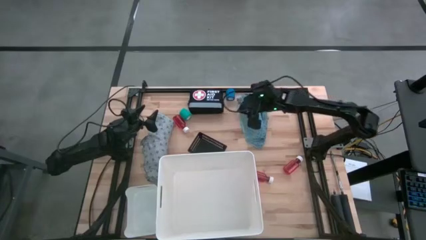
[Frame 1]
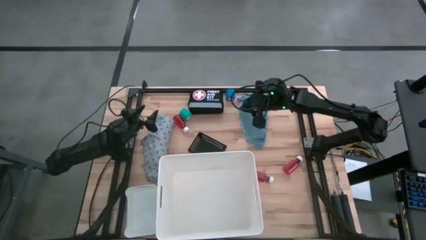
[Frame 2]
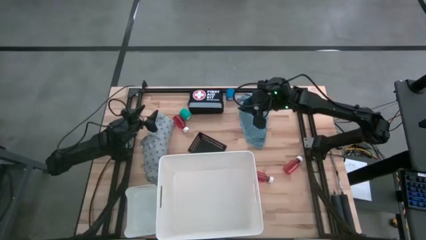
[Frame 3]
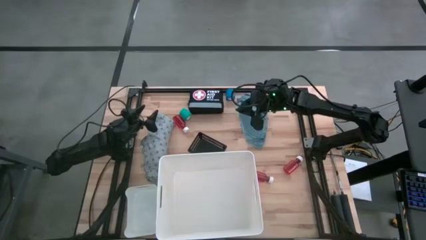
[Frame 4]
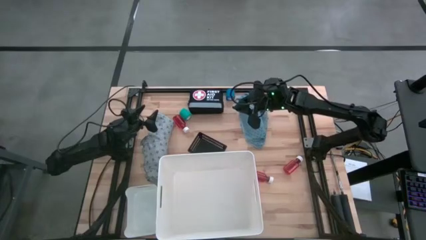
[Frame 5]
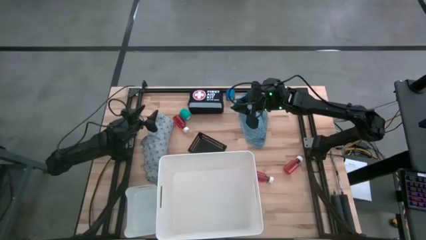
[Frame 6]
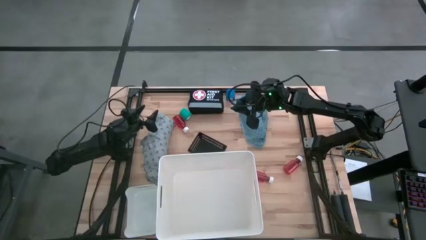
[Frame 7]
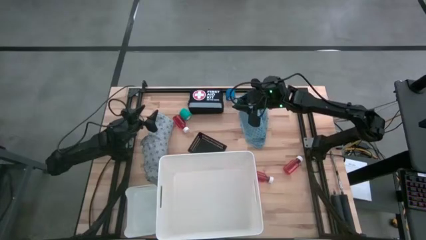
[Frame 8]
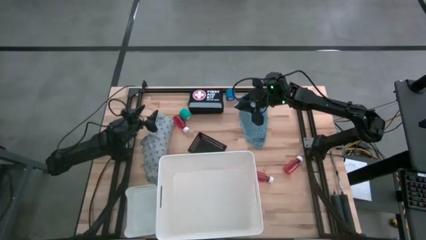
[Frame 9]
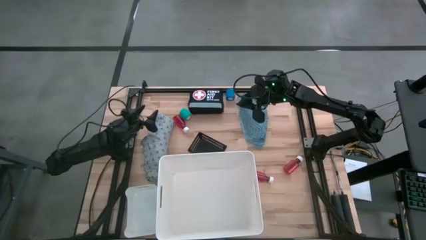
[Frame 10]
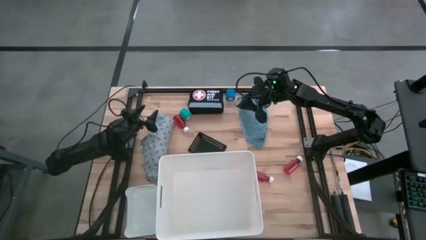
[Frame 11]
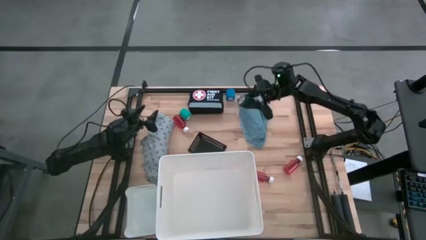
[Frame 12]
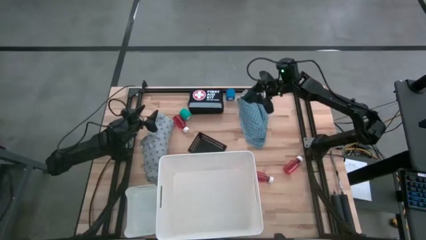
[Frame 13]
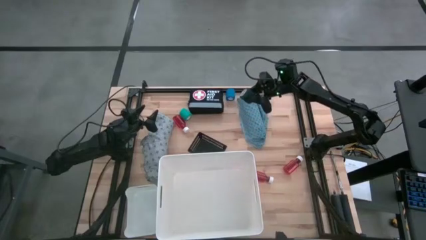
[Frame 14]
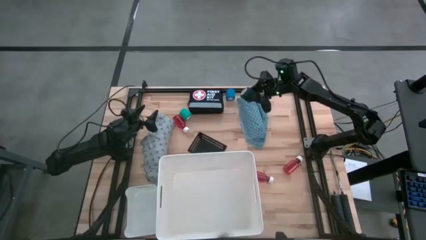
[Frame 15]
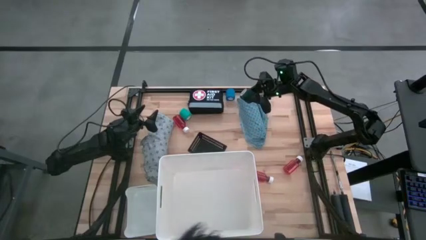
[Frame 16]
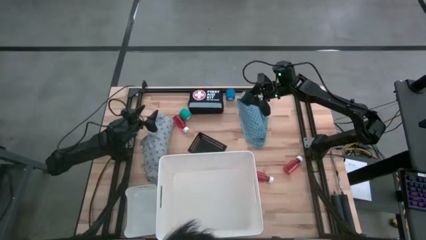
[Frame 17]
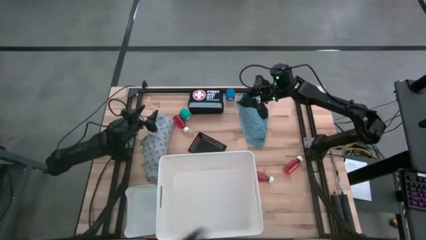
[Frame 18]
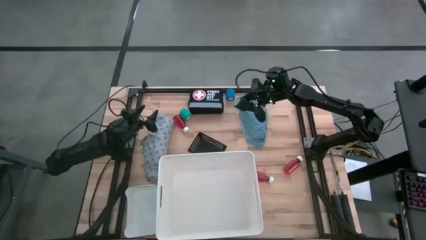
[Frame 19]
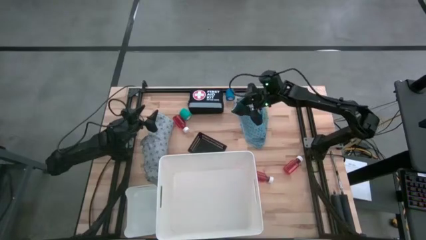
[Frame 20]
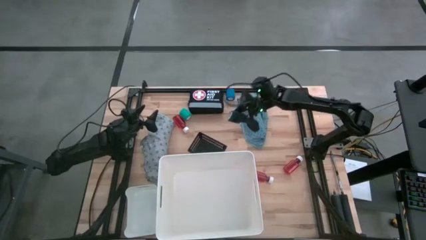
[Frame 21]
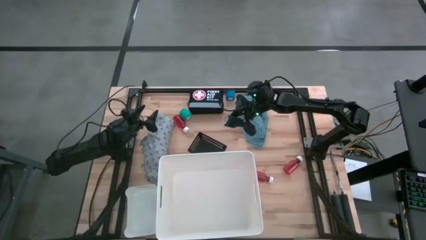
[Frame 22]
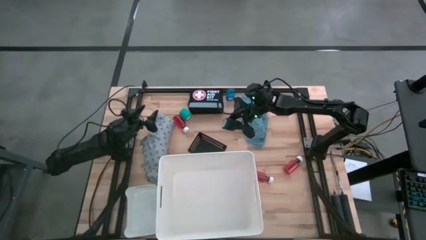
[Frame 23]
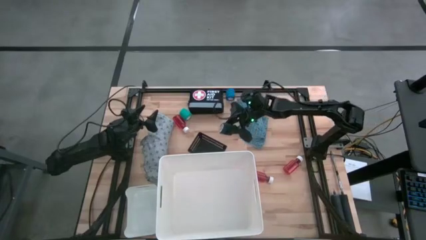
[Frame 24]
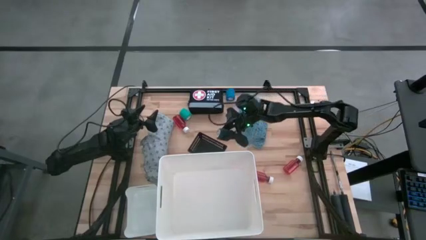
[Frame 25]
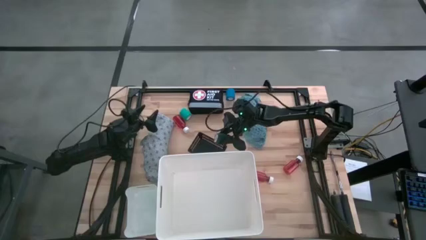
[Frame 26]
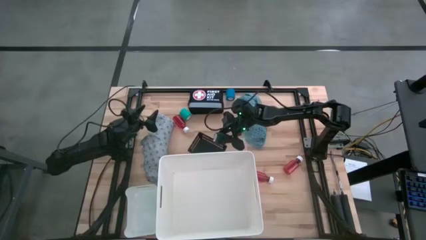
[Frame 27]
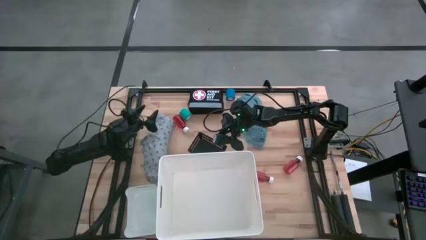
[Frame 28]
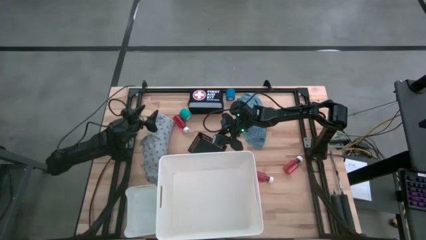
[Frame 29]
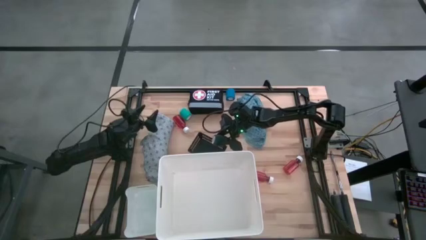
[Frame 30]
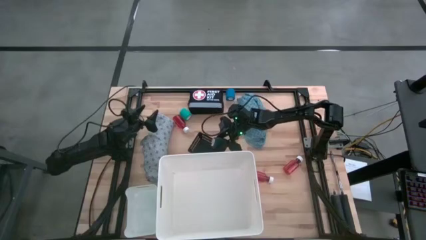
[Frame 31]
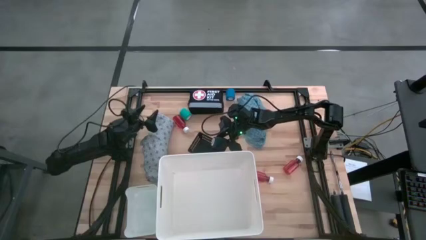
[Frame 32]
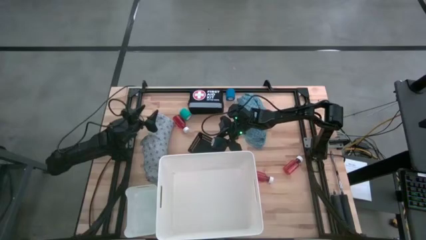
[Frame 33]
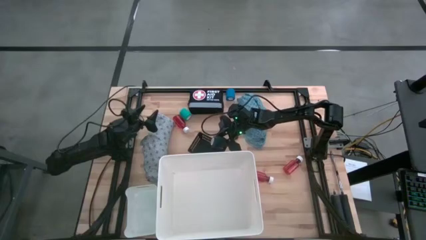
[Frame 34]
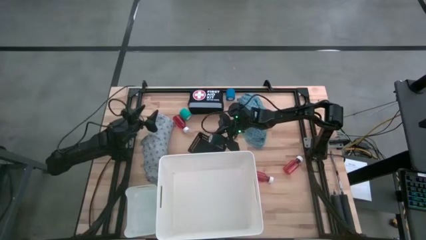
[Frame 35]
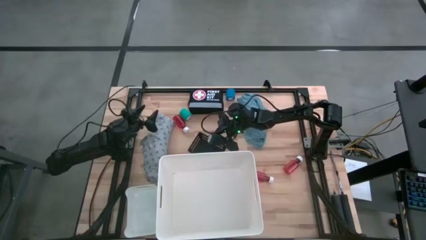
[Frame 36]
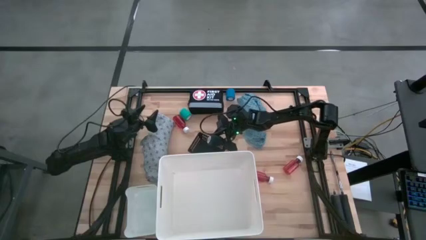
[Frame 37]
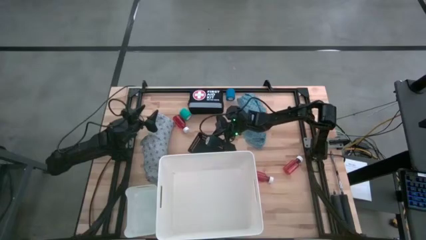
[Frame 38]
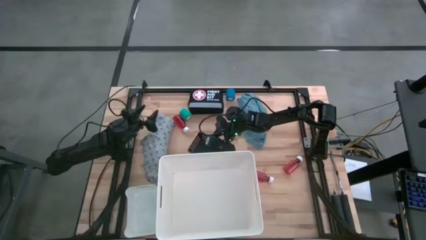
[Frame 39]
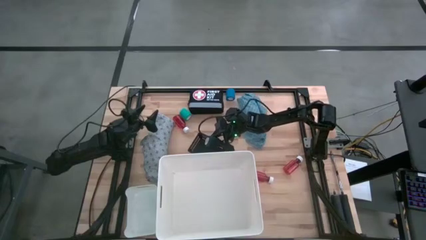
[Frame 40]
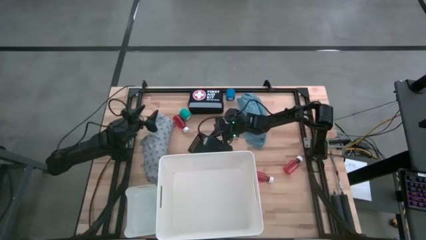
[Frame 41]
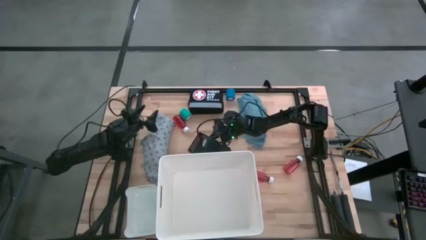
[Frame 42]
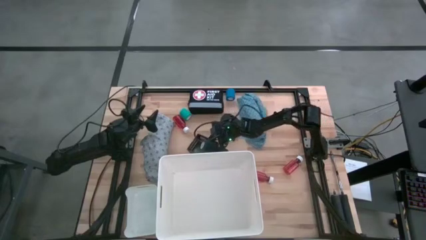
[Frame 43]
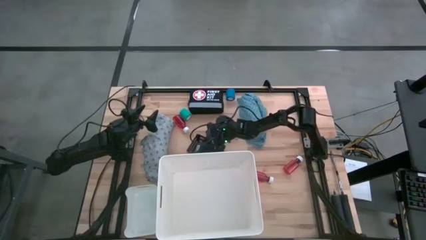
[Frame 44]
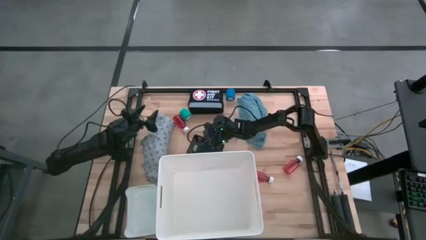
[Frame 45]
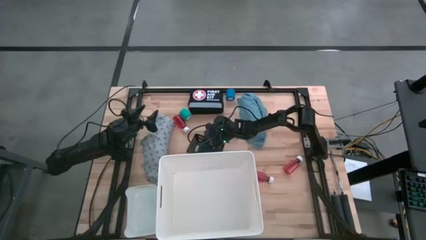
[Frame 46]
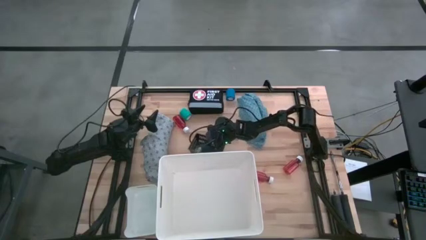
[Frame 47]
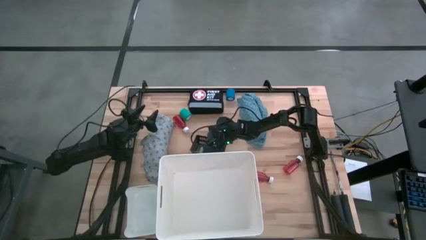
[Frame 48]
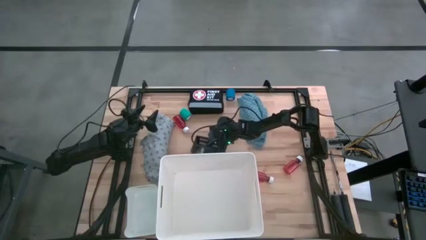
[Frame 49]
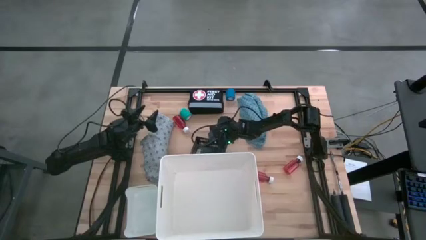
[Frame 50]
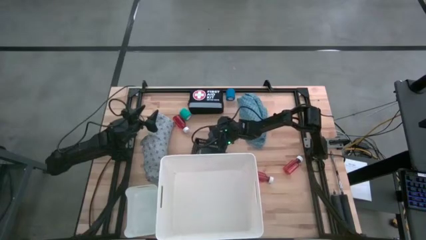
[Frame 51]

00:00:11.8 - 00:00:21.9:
Task: Pick & Place Medicine items
Put the black bandage into the black bin
